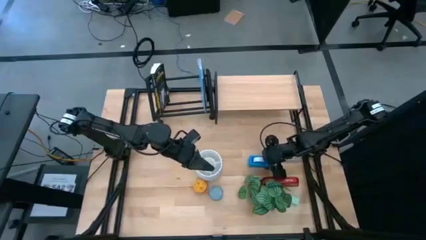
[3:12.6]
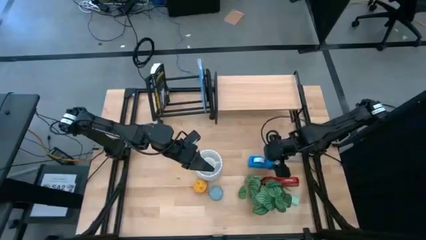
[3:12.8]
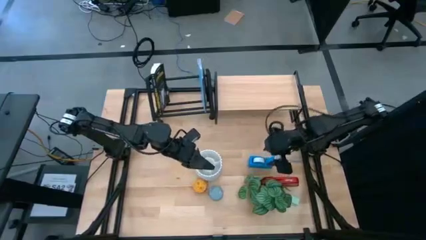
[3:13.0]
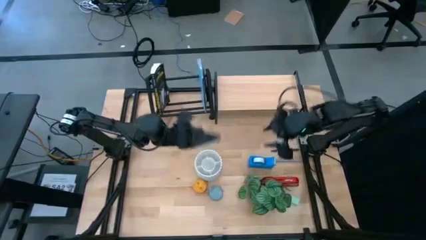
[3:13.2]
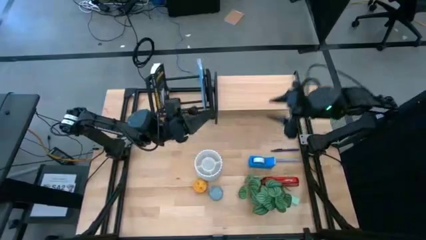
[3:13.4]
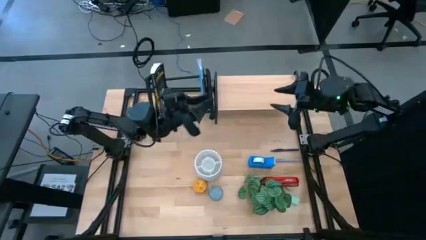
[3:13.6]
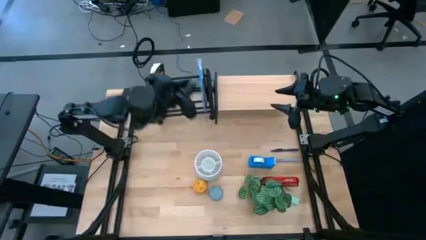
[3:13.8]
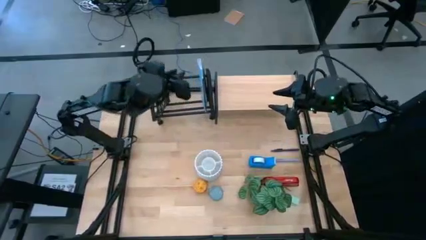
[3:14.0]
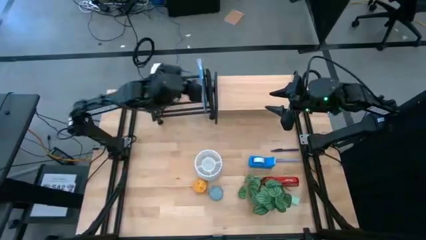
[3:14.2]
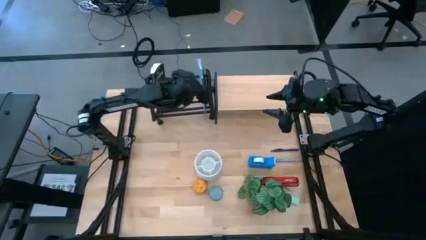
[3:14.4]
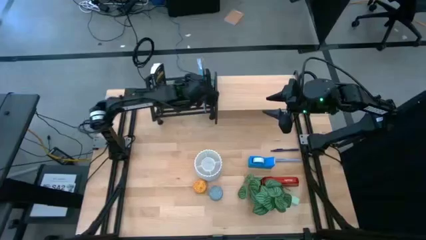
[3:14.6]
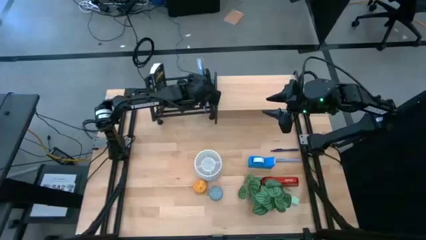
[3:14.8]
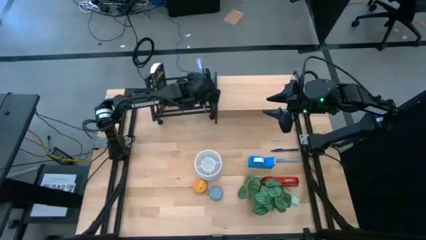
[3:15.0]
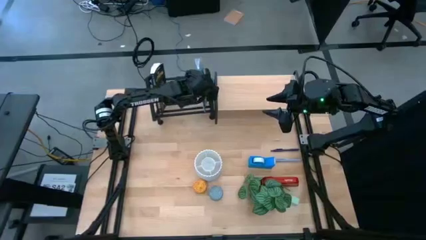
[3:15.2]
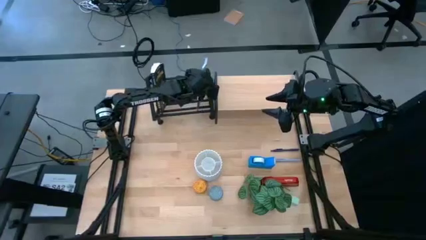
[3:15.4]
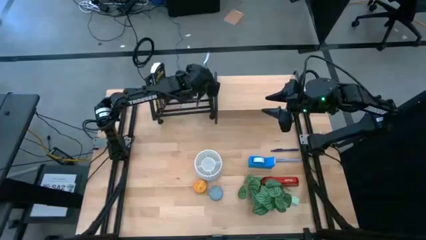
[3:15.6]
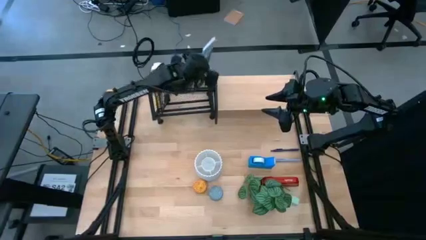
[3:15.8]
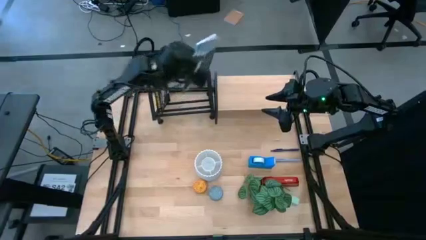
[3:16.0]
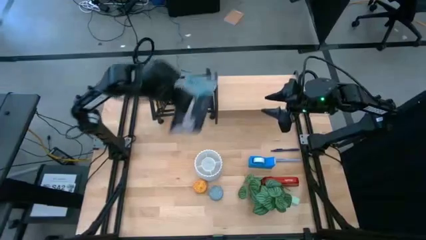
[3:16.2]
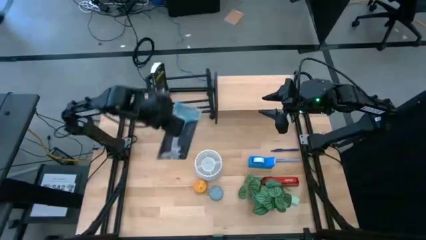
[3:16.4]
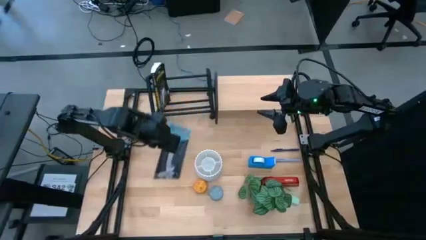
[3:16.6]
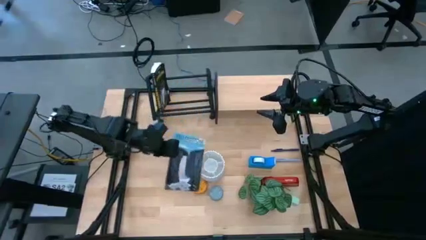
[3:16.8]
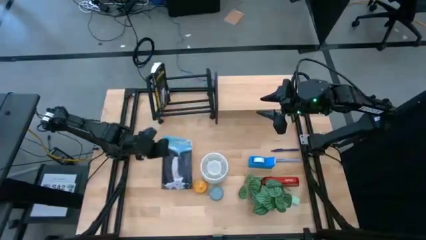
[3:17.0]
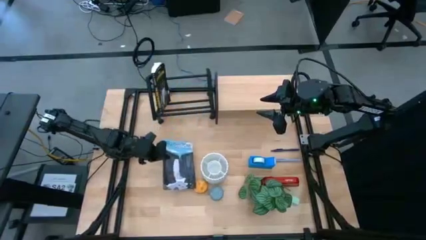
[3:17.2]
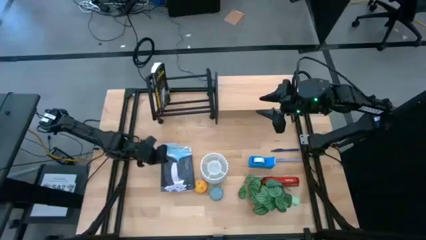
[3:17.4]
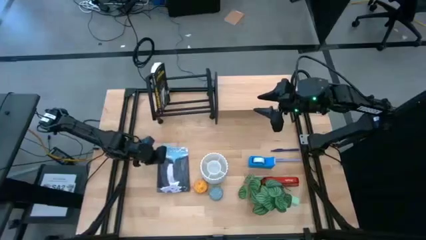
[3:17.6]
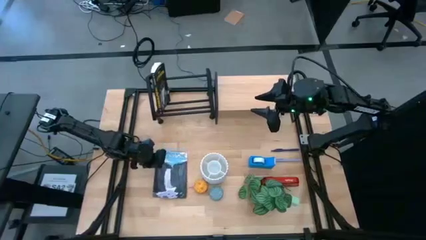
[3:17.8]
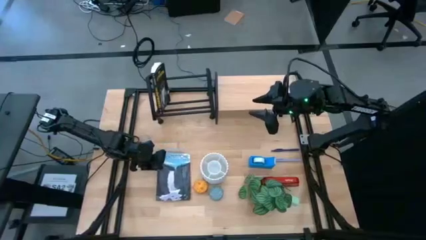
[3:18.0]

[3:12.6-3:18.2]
Task: Stock shelves
Remove the blue book from the black book shelf

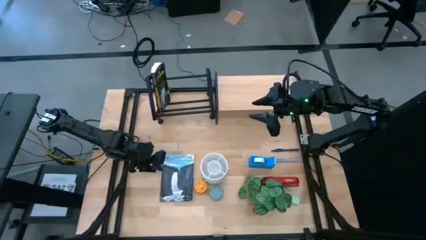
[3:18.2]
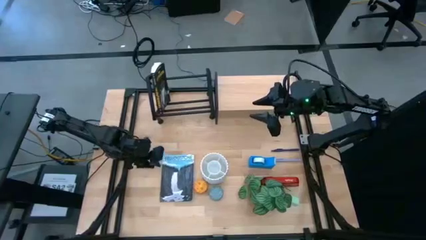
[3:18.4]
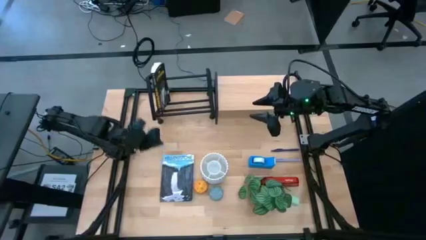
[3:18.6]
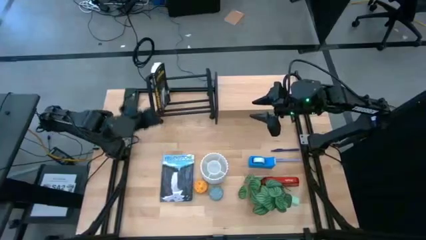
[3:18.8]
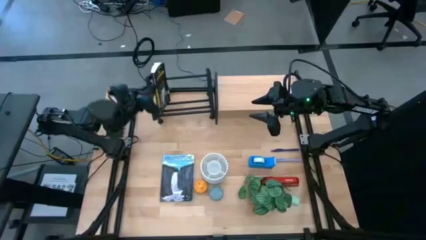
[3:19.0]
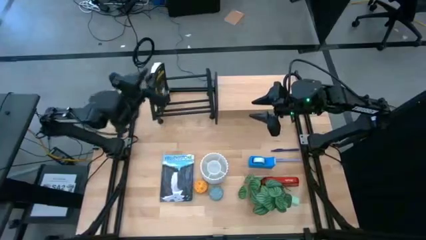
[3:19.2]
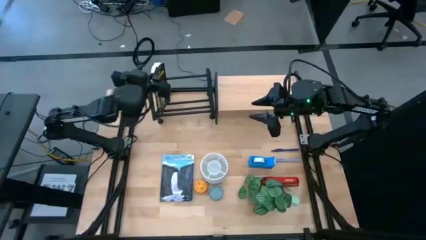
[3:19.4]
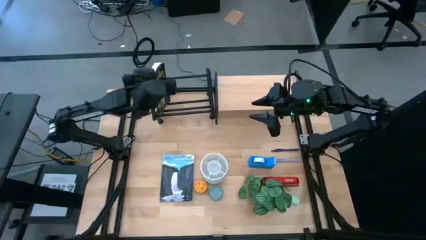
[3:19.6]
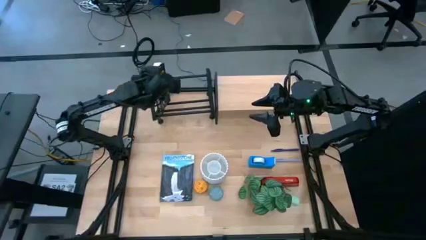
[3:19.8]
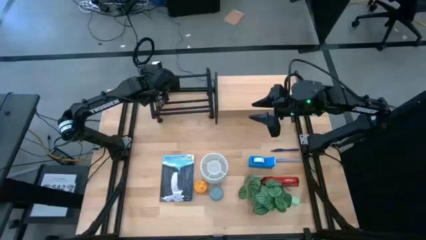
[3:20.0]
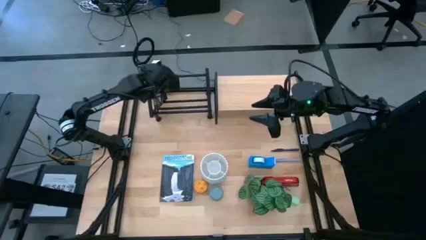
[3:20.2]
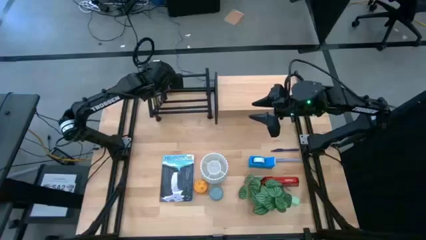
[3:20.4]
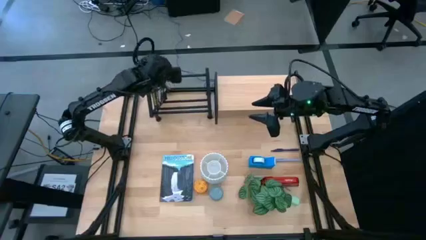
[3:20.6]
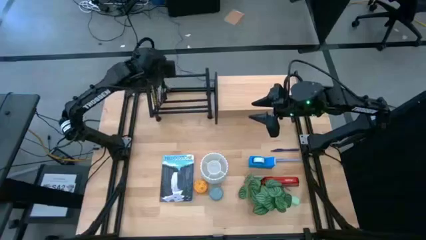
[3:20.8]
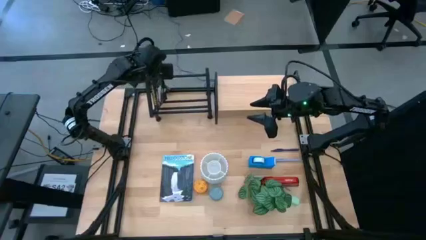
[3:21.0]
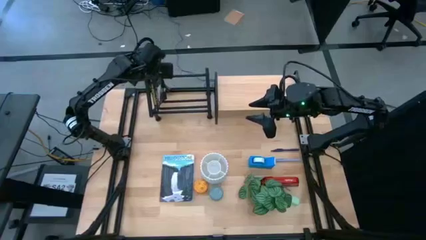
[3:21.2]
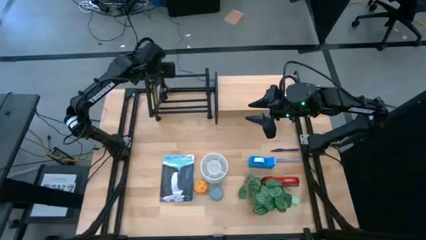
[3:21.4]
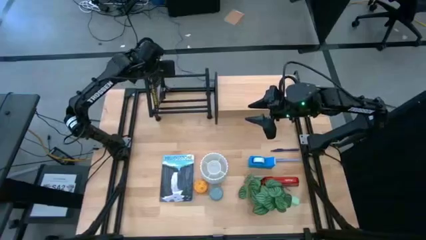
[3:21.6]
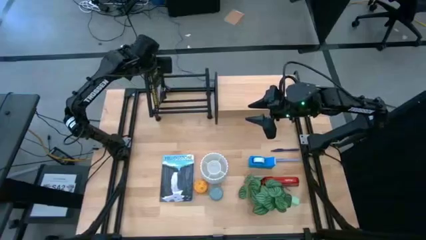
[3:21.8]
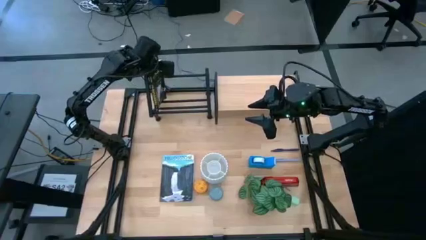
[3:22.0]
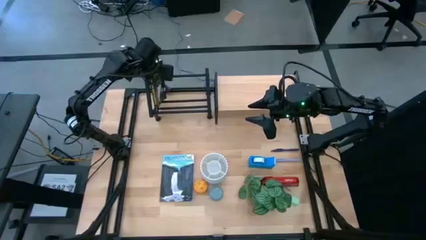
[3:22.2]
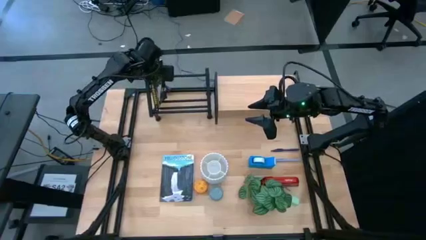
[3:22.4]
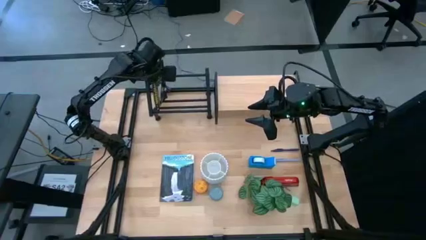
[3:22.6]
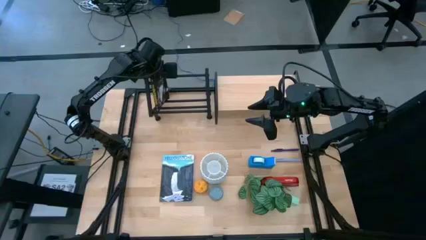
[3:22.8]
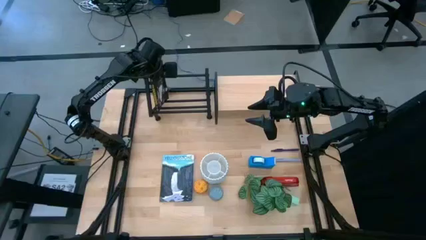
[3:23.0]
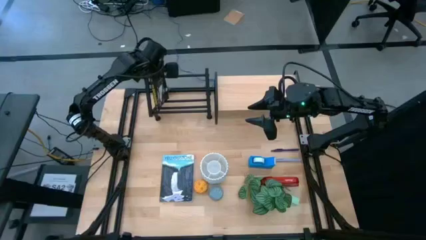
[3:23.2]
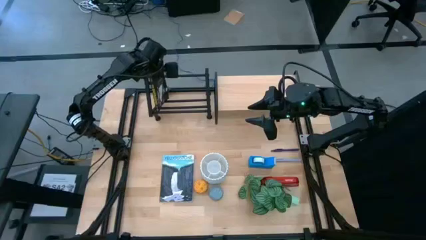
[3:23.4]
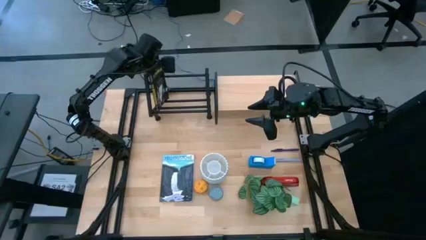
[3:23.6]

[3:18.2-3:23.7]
Remove the black book from the black book shelf

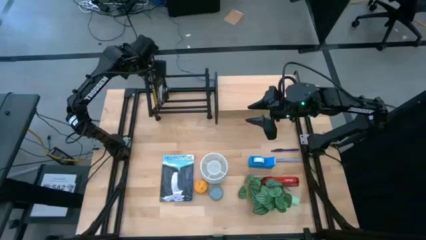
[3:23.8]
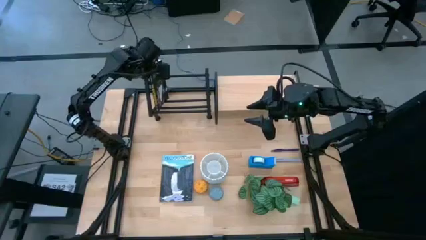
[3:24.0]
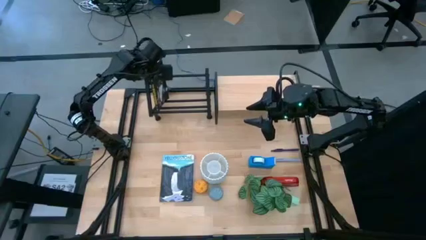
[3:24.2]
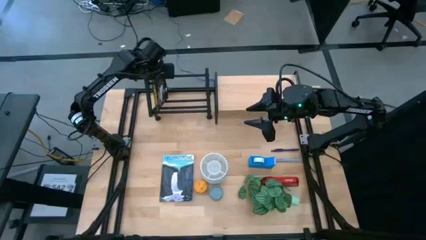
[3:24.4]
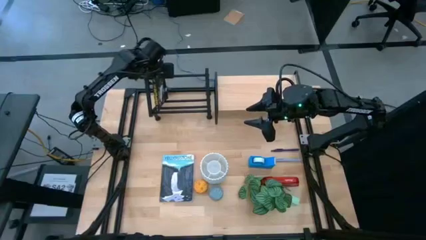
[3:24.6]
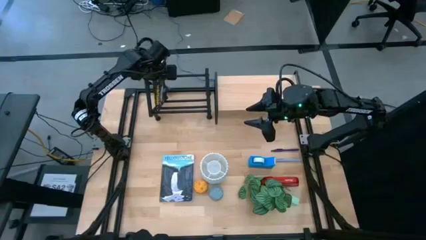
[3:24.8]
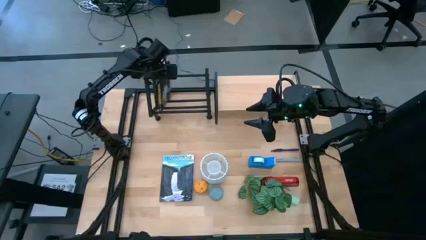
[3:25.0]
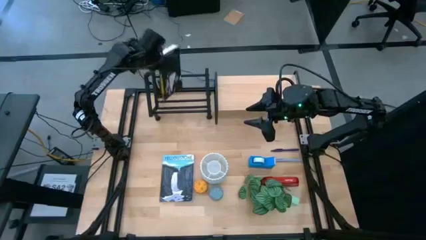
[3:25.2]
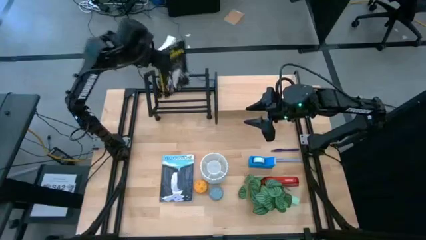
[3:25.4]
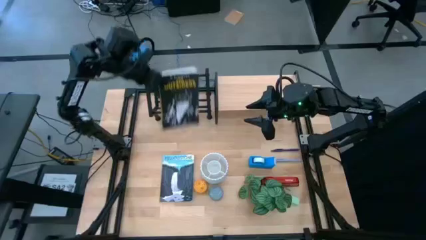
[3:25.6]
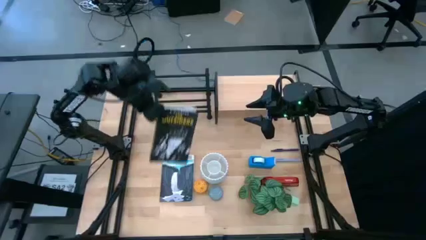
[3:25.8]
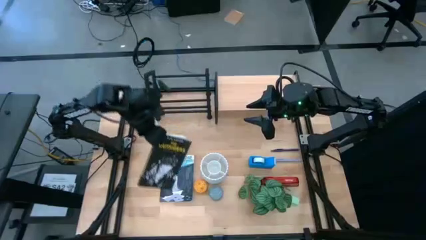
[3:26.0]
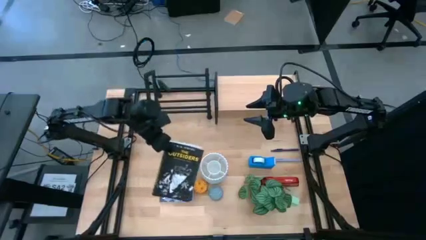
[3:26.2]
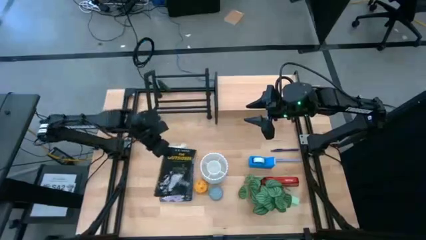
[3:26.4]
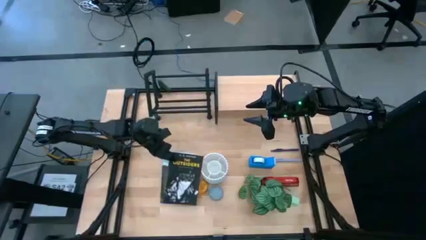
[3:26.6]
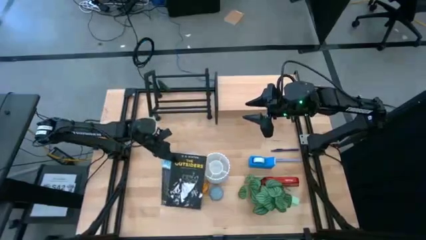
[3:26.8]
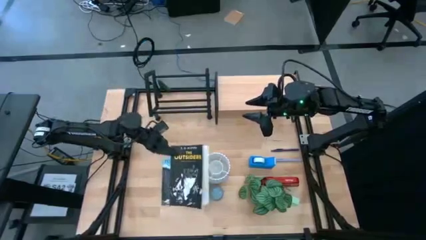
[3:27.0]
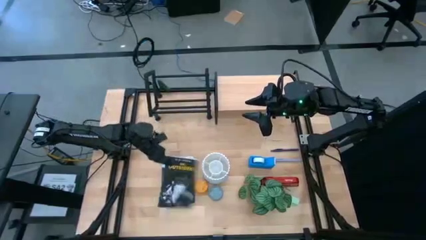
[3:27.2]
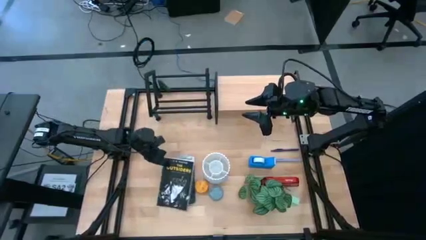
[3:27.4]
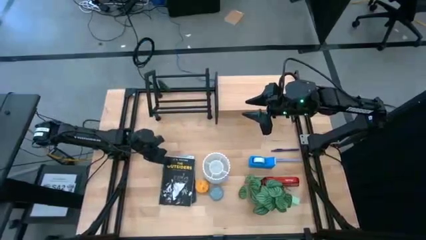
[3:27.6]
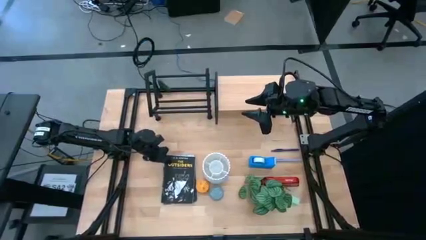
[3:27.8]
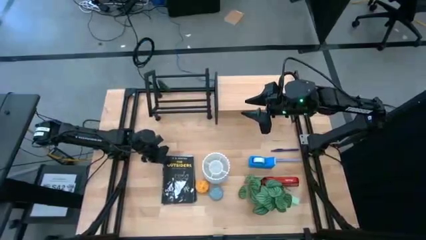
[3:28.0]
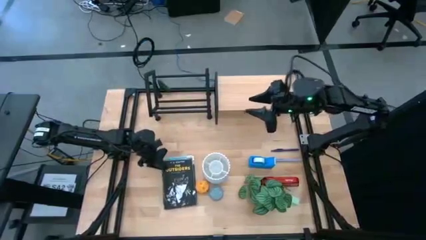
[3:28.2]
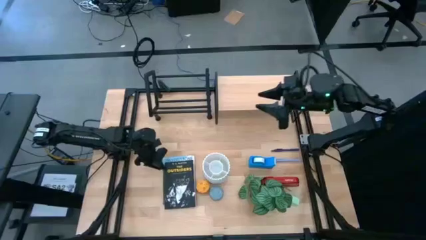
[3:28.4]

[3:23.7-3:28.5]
Remove the black book from the black book shelf
